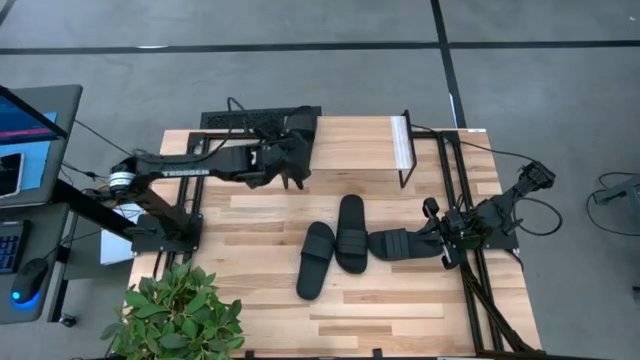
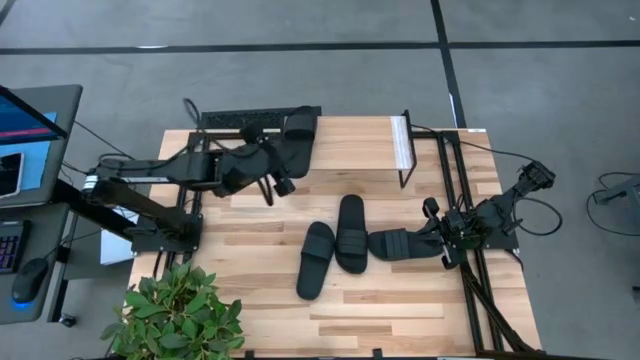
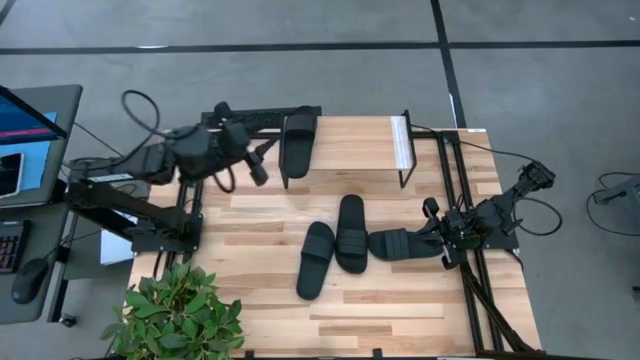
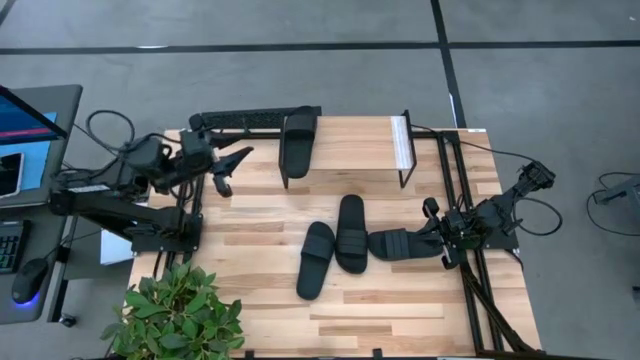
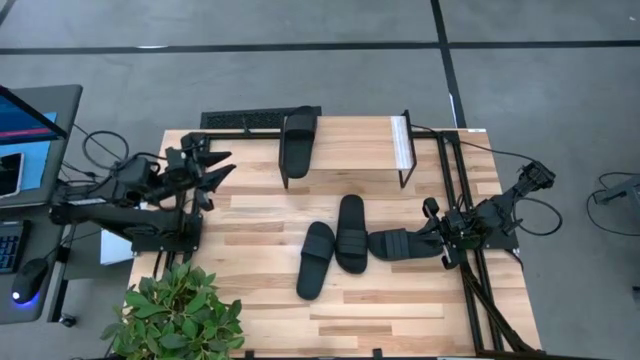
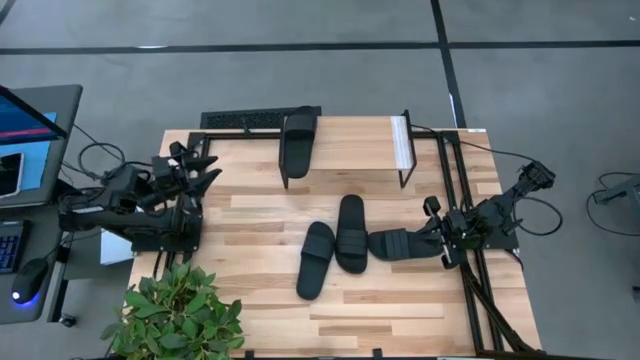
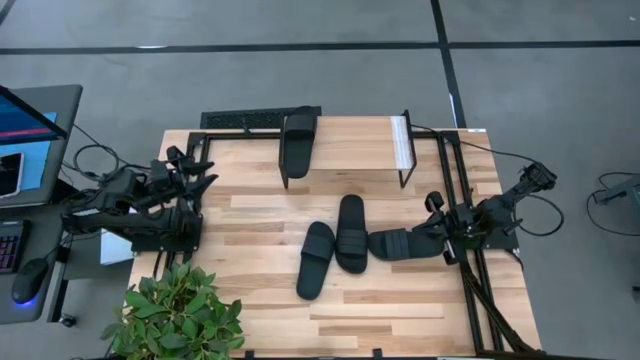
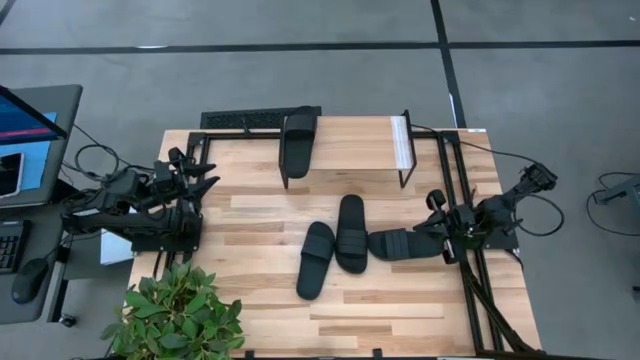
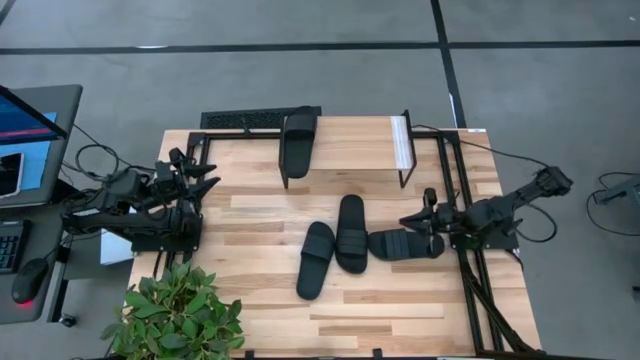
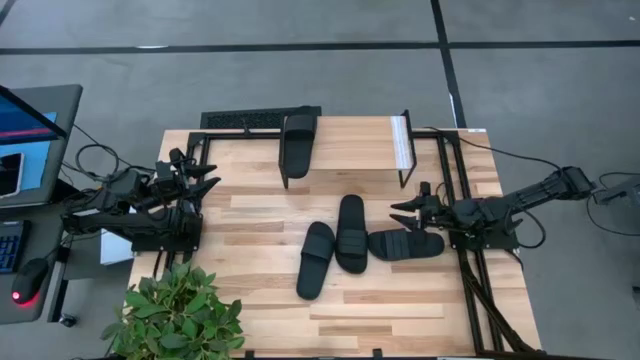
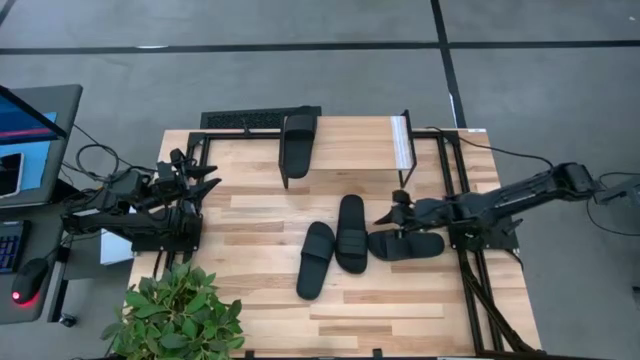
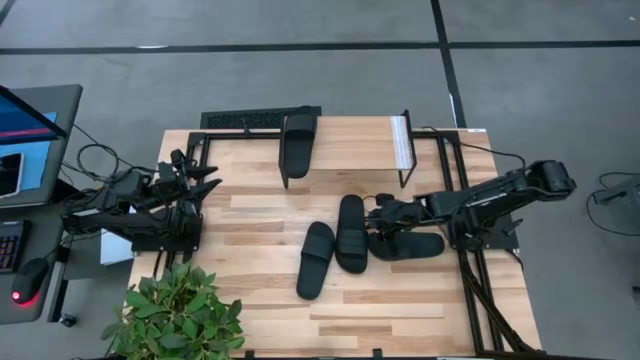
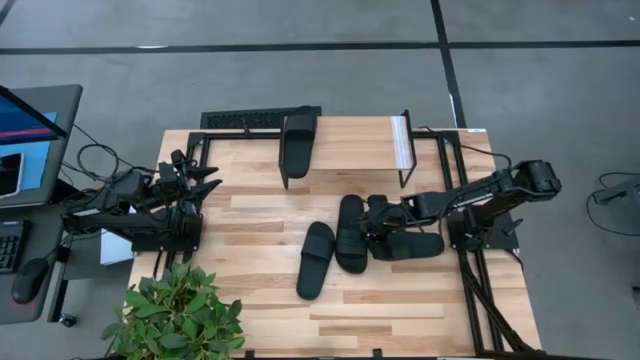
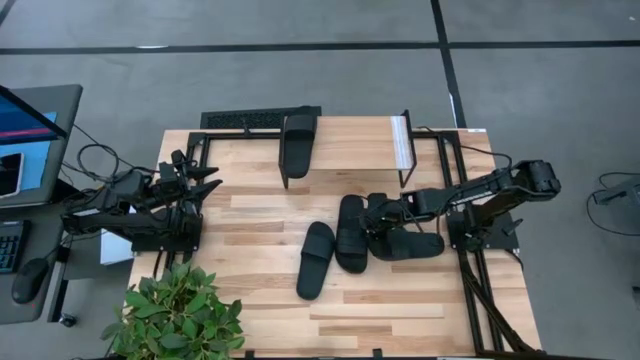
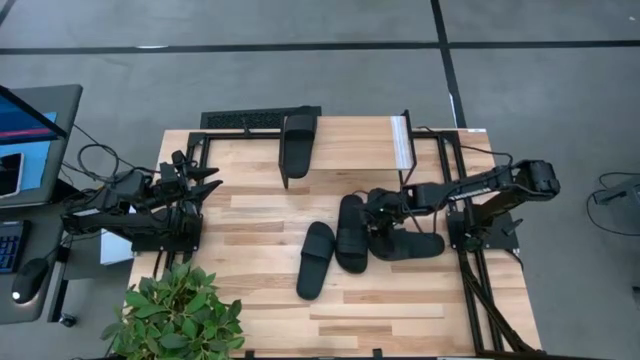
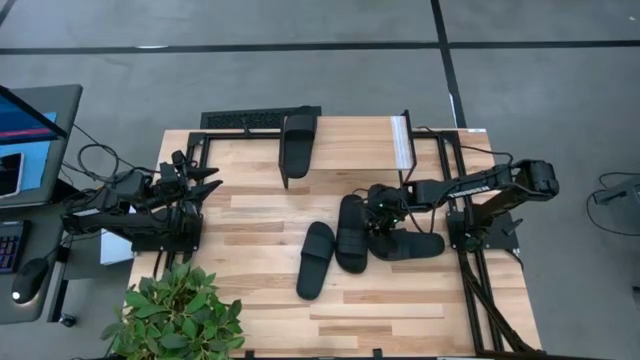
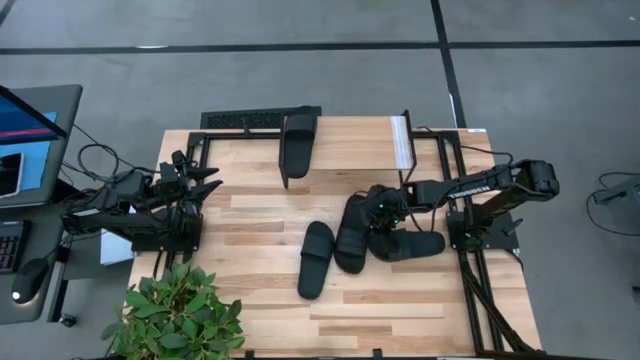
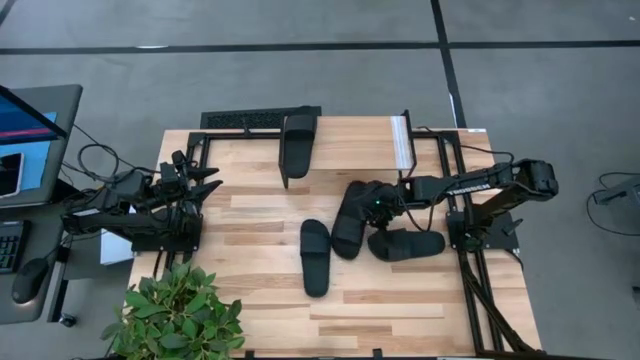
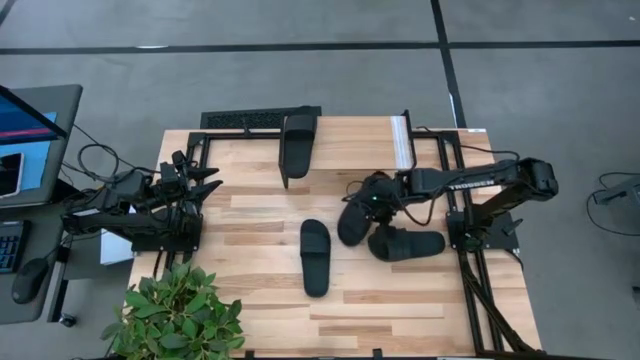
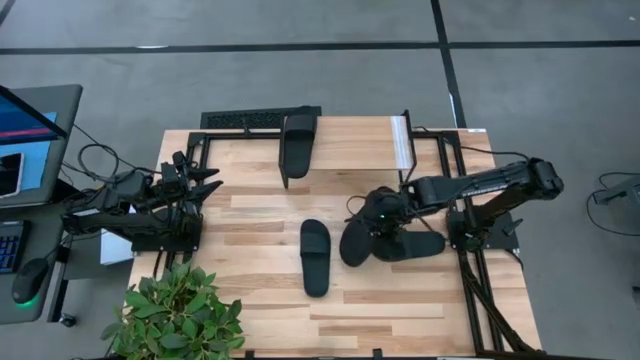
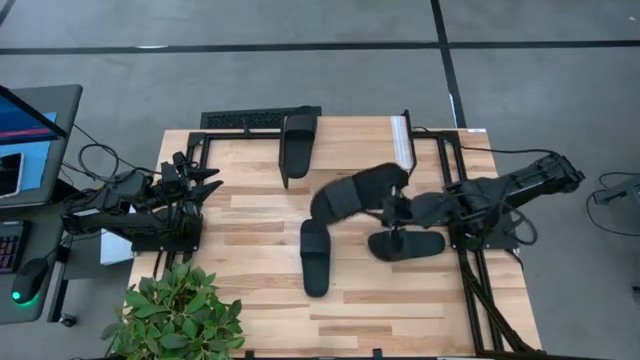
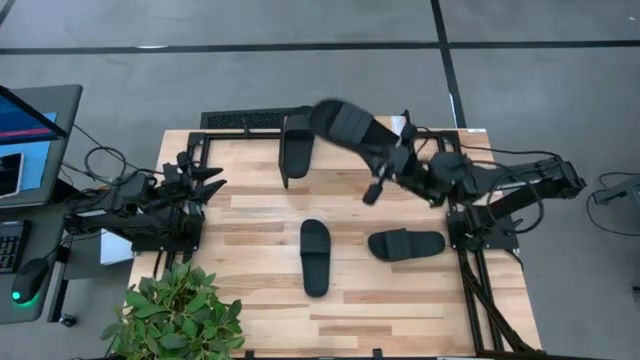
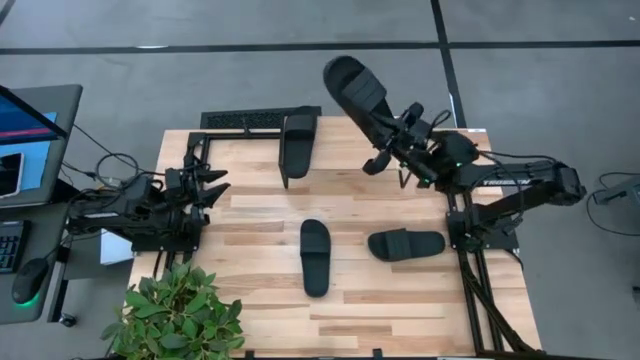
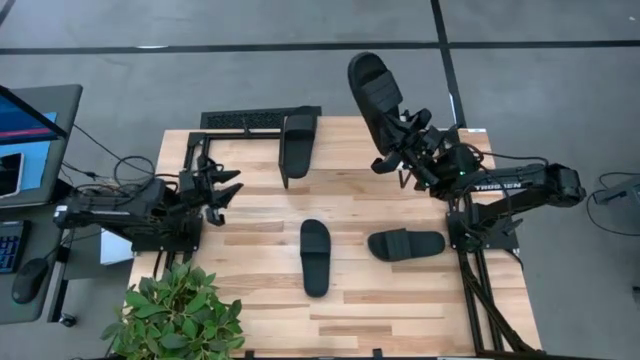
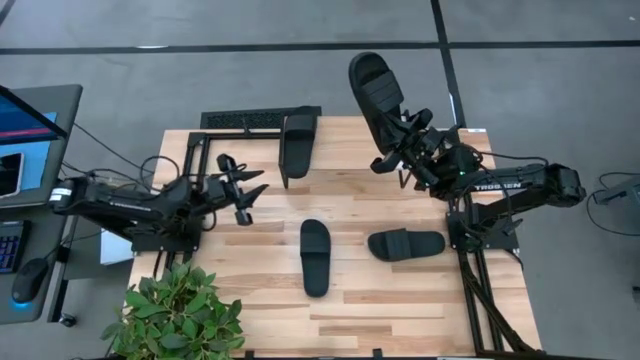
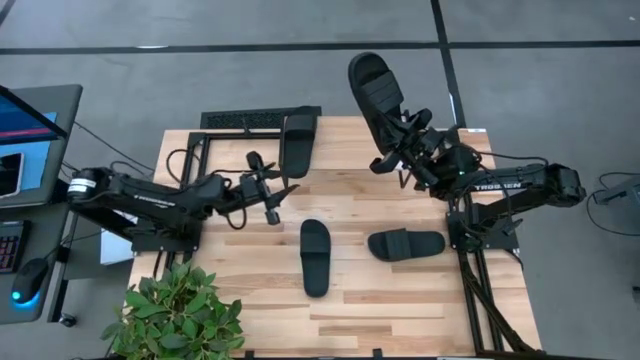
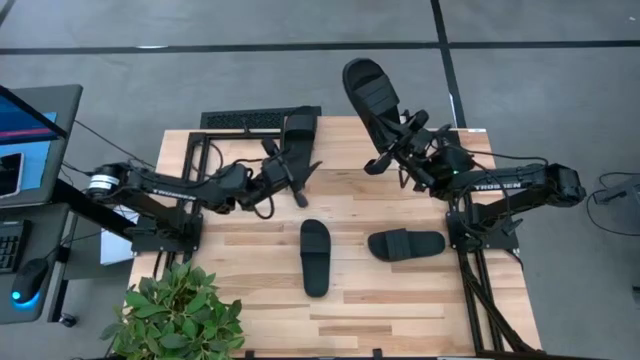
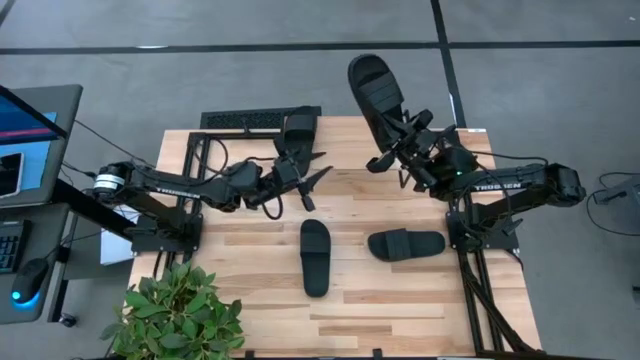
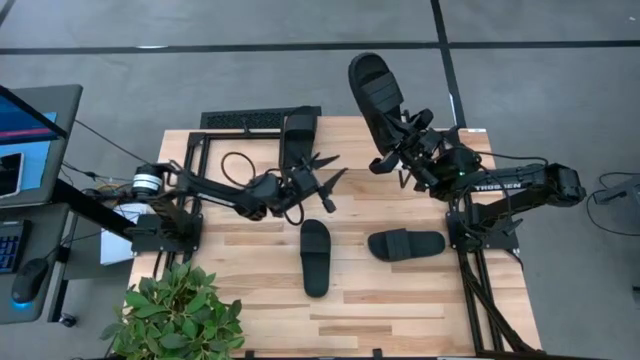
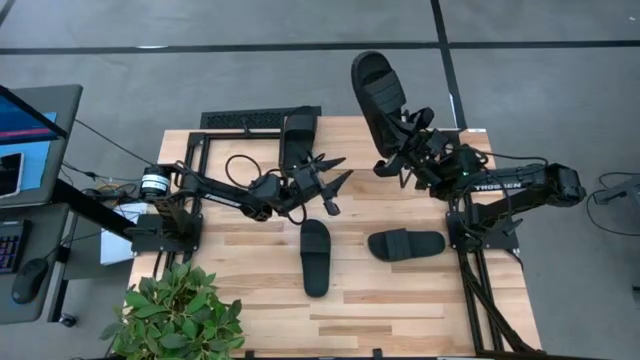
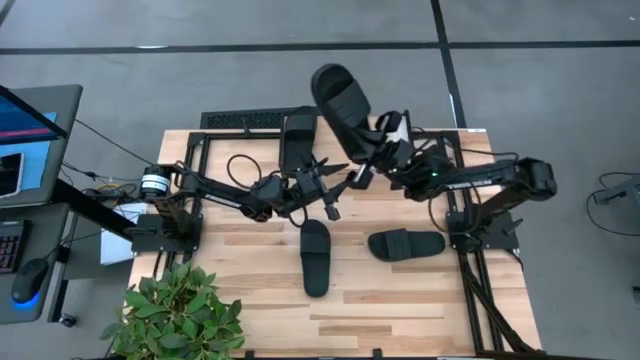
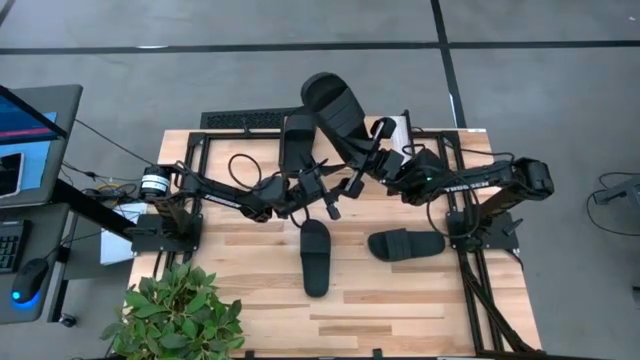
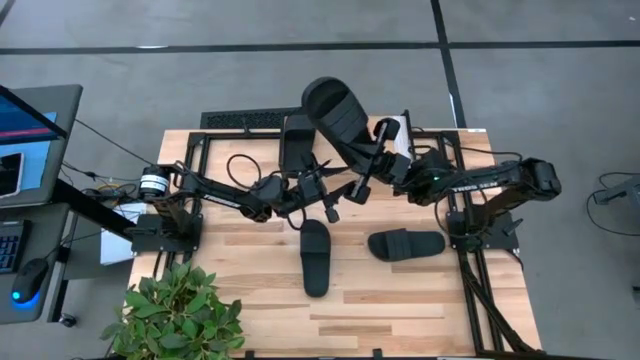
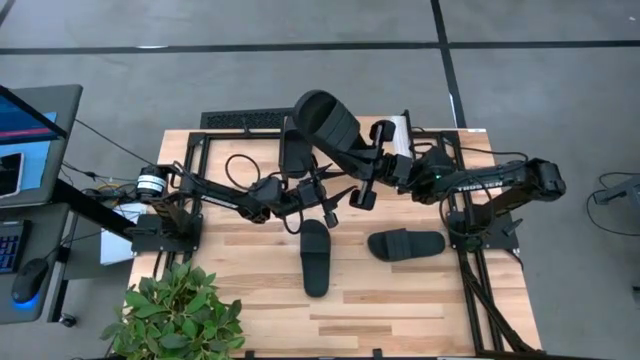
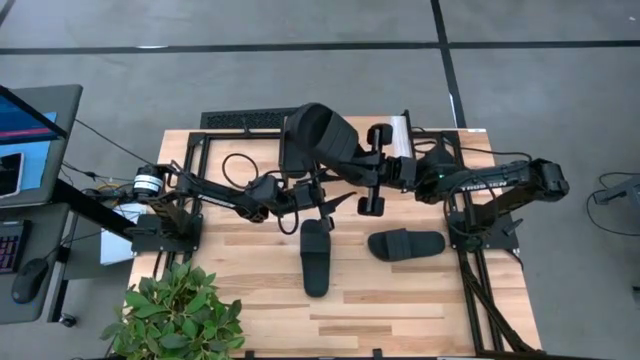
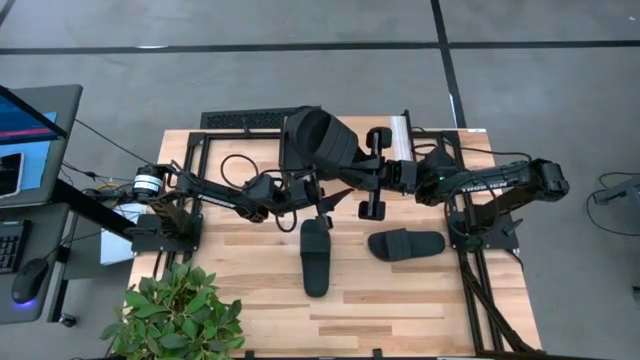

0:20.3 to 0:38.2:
Task: Pick and place slides into the shelf
Put the black slide on the shelf

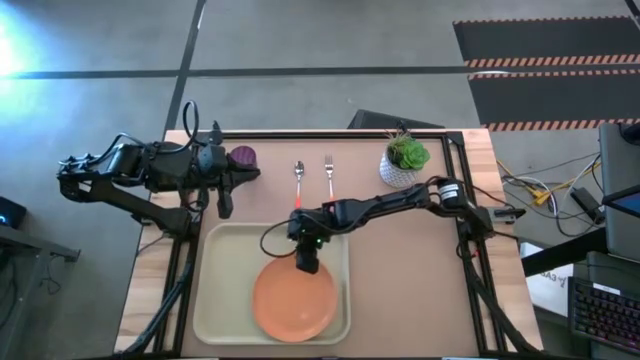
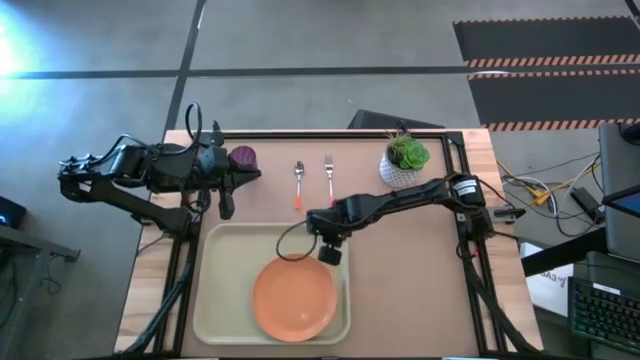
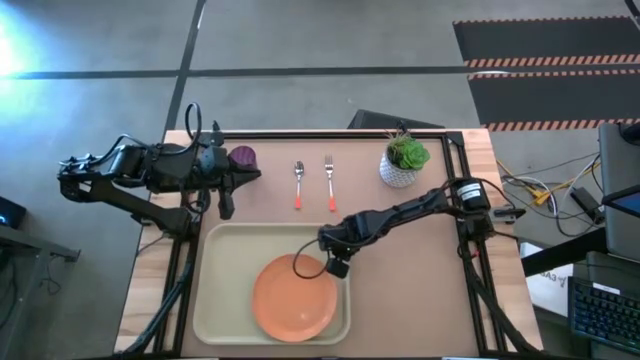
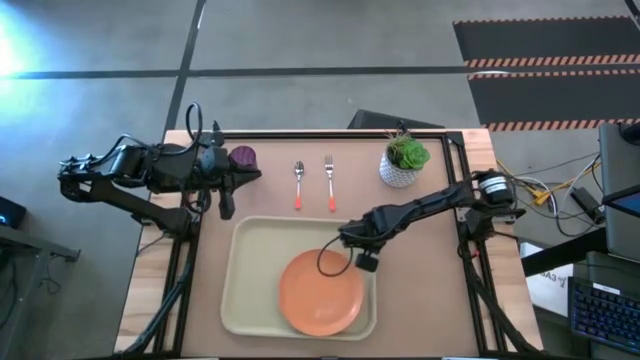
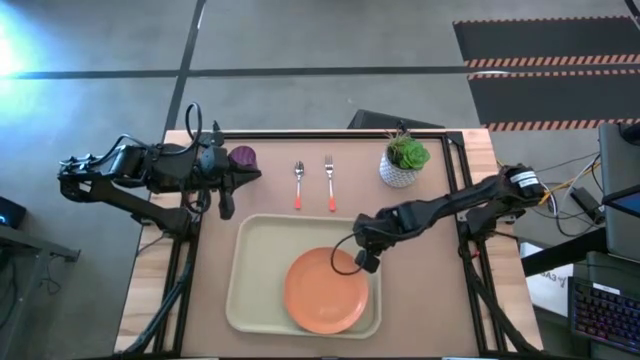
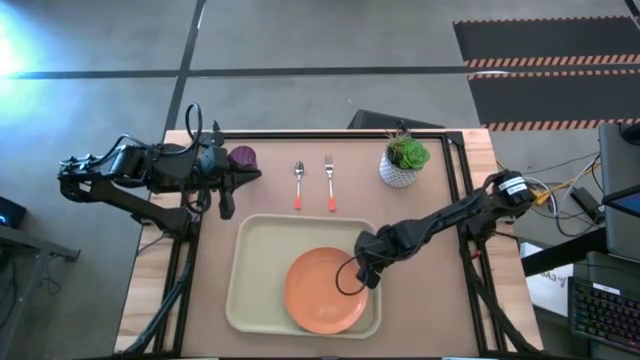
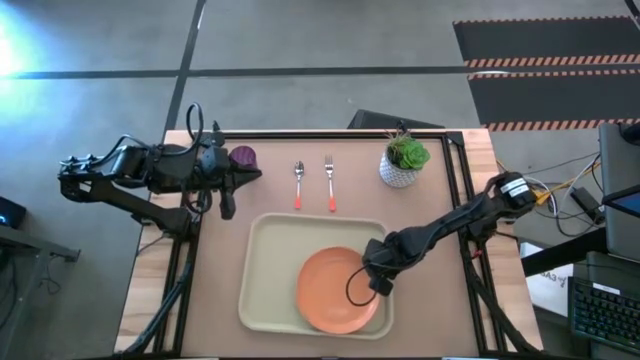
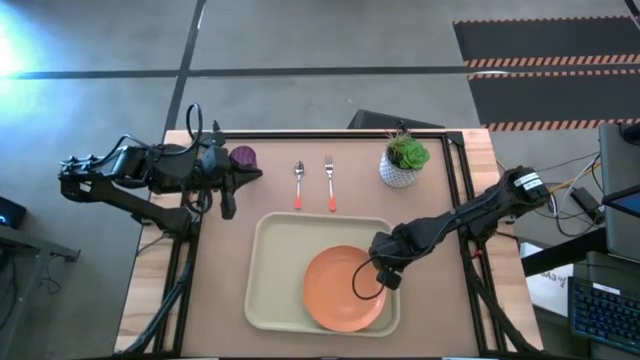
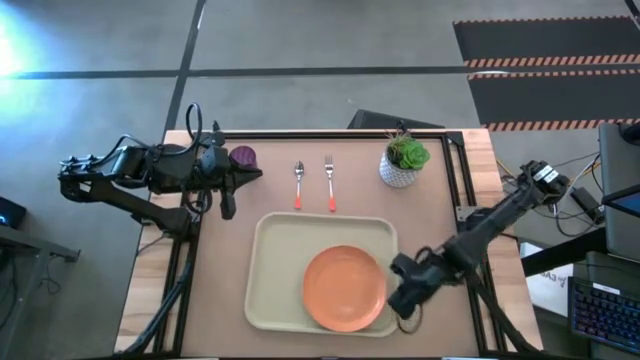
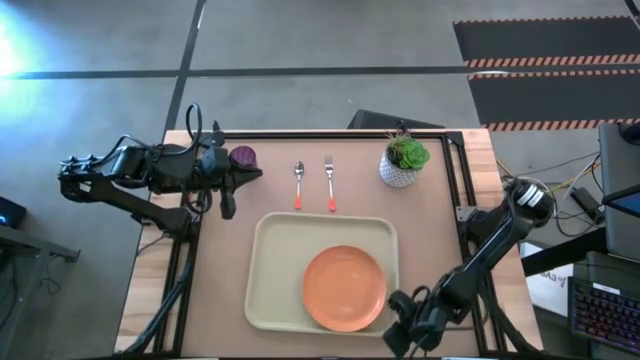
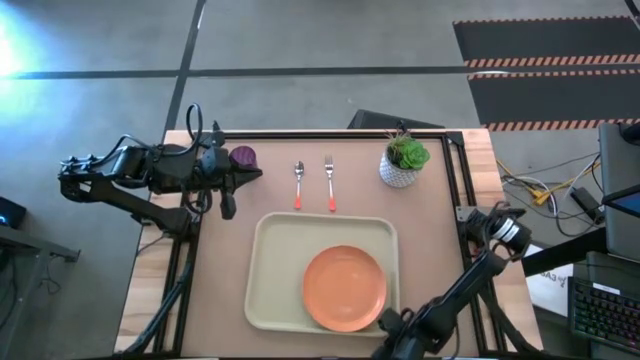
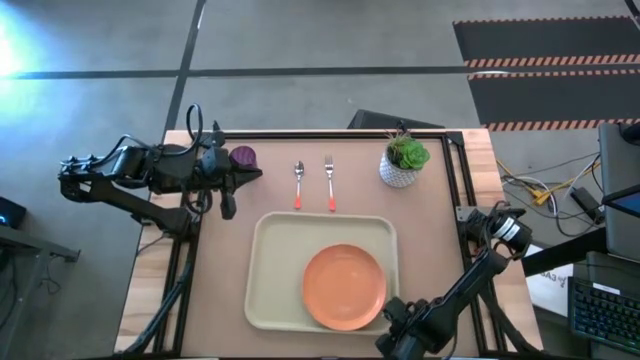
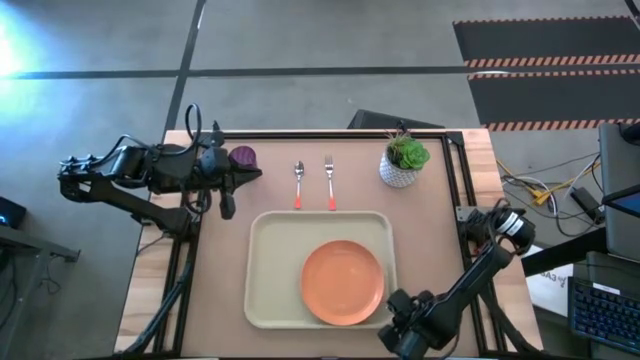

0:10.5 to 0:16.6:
Task: Pick and place plate/cup/fork/spoon on tray
Adjust the white tray
